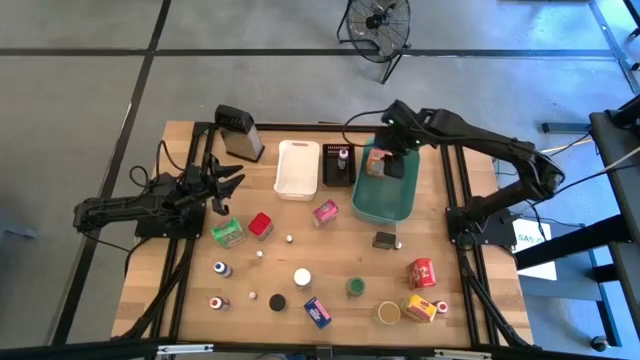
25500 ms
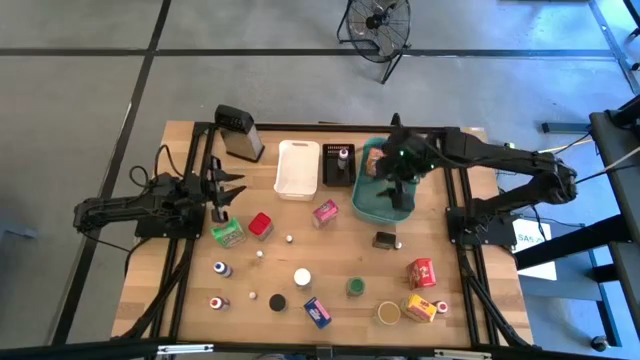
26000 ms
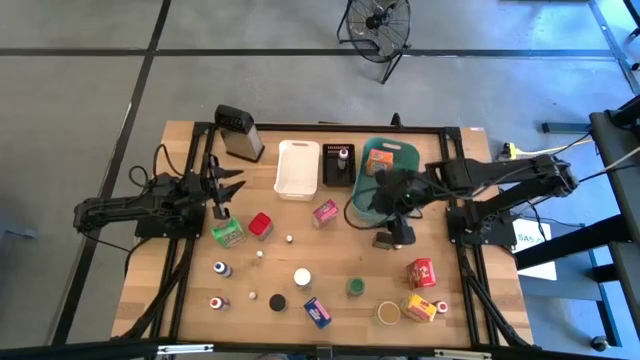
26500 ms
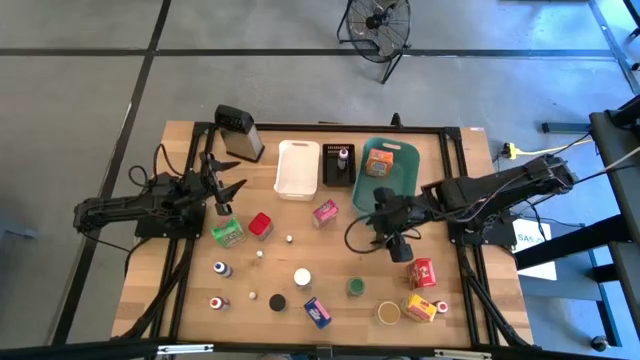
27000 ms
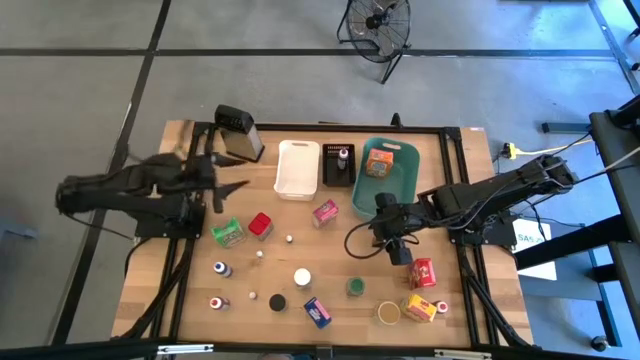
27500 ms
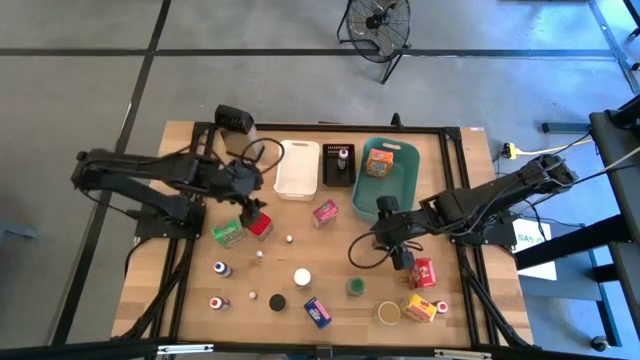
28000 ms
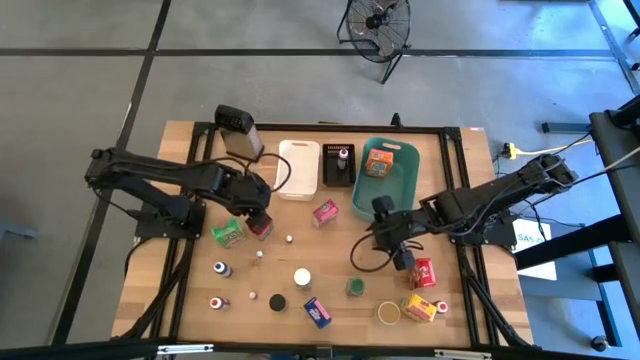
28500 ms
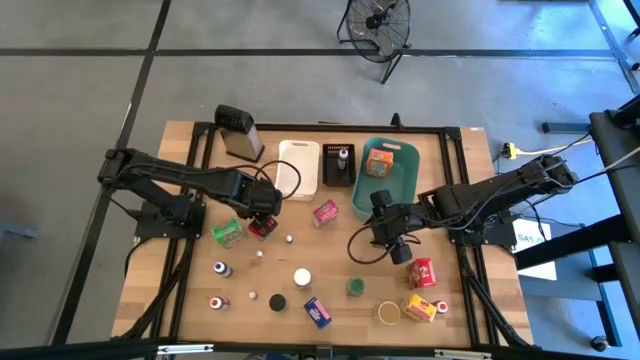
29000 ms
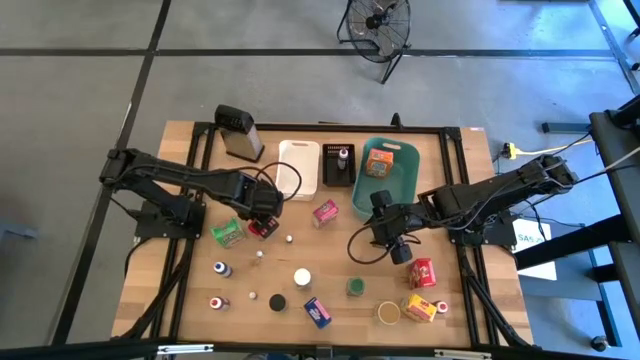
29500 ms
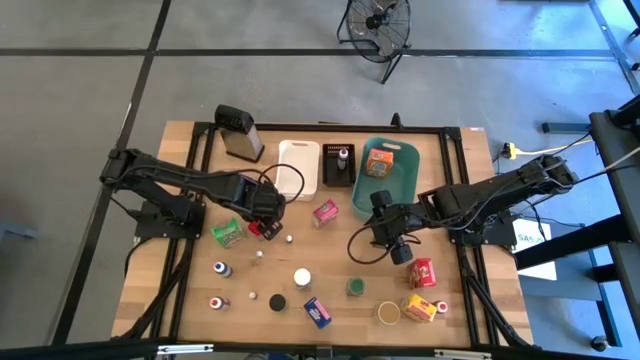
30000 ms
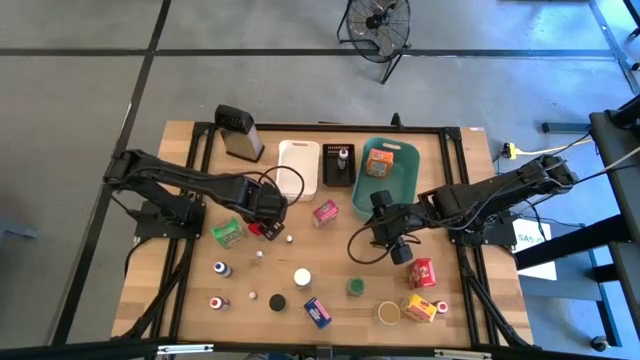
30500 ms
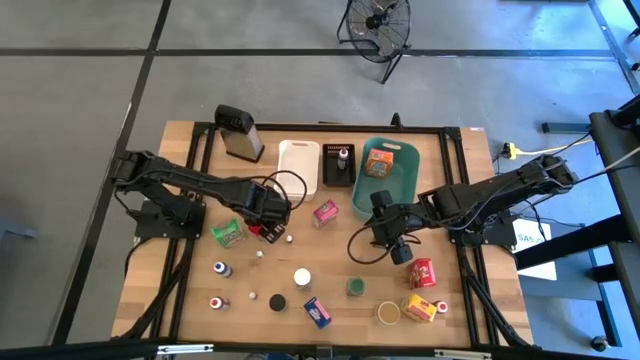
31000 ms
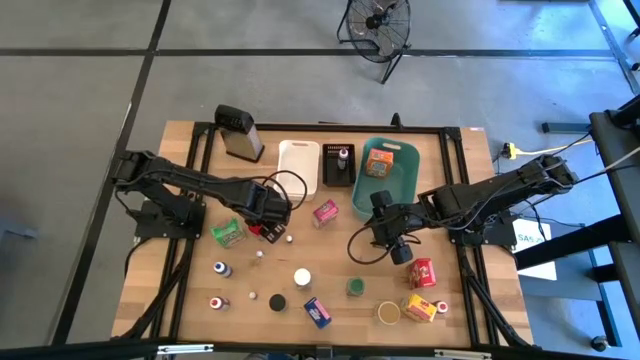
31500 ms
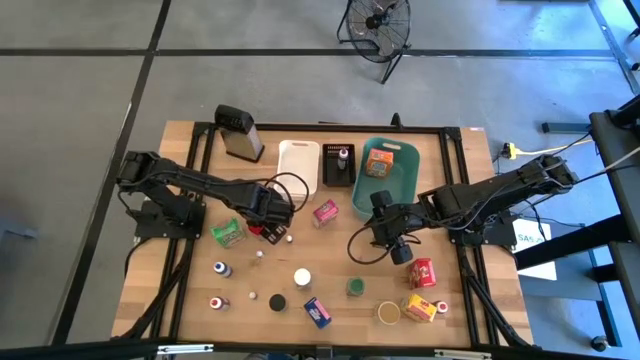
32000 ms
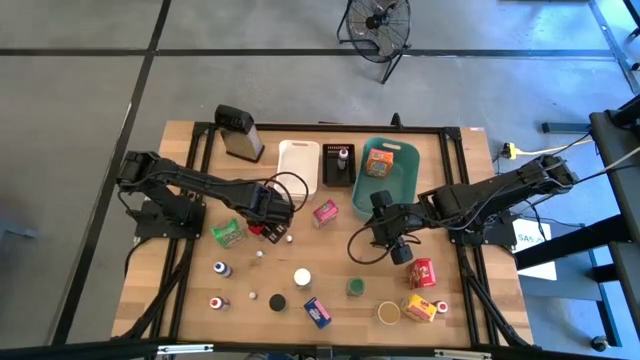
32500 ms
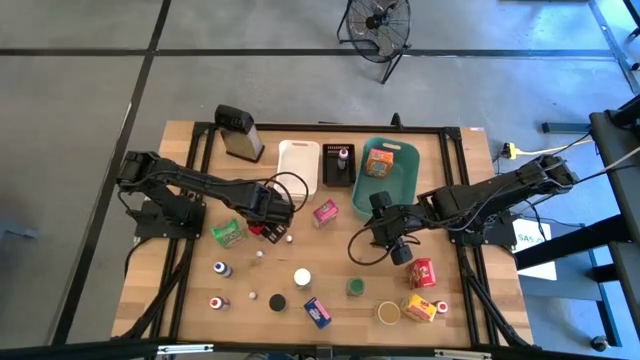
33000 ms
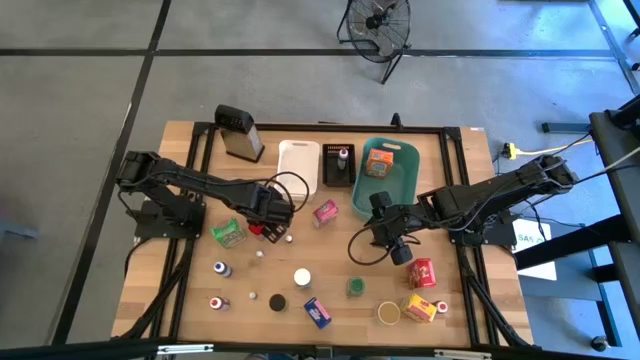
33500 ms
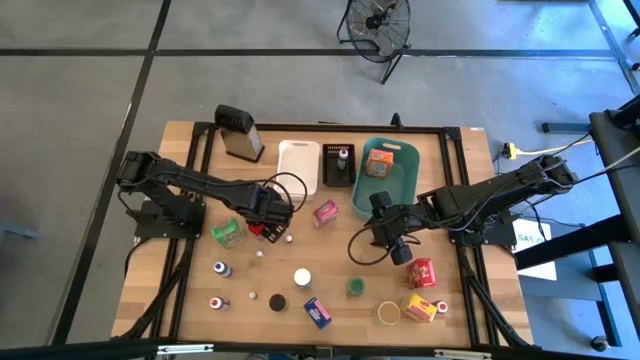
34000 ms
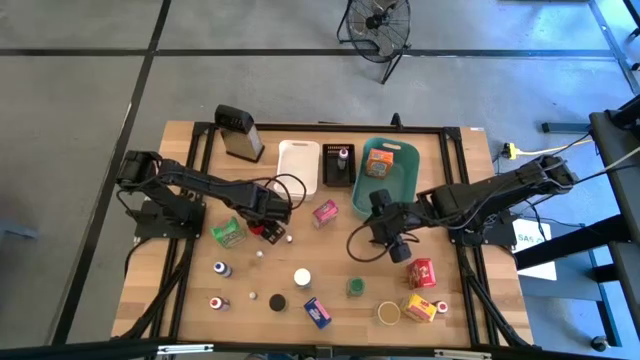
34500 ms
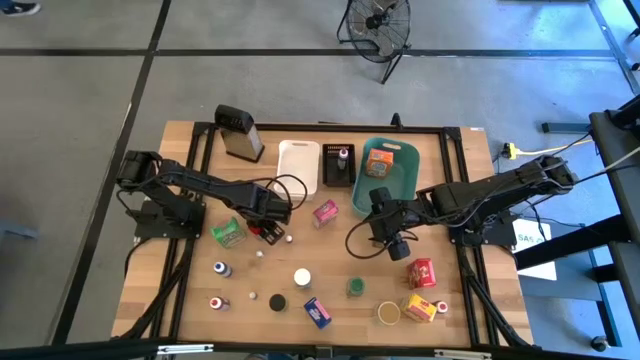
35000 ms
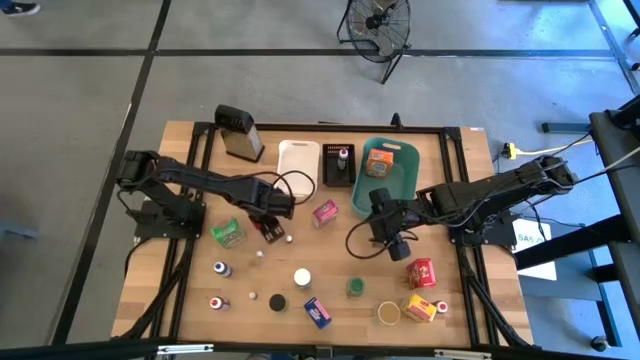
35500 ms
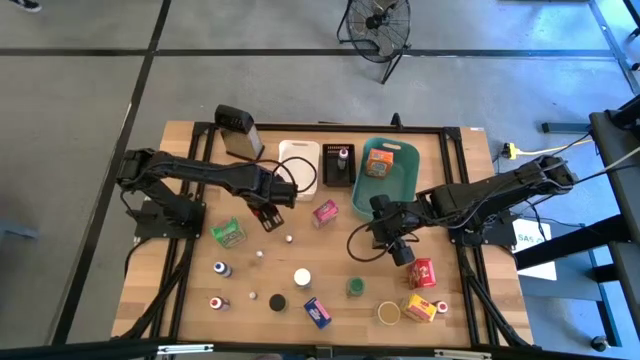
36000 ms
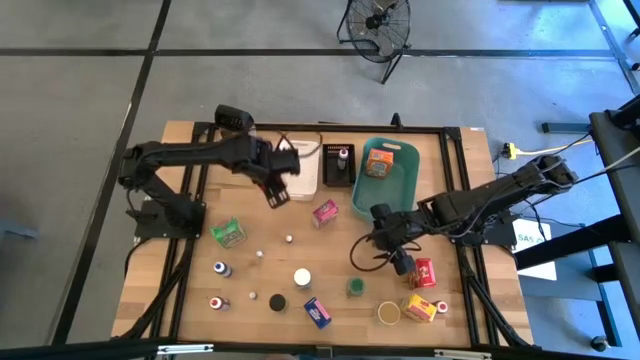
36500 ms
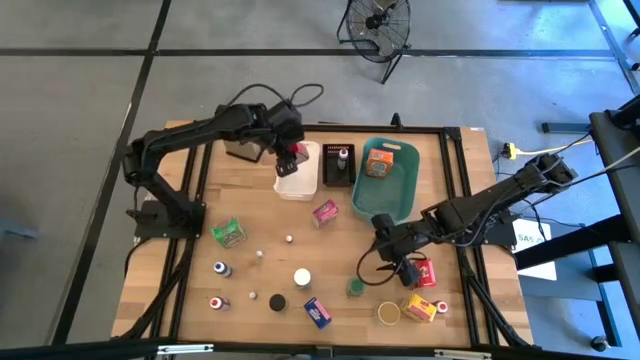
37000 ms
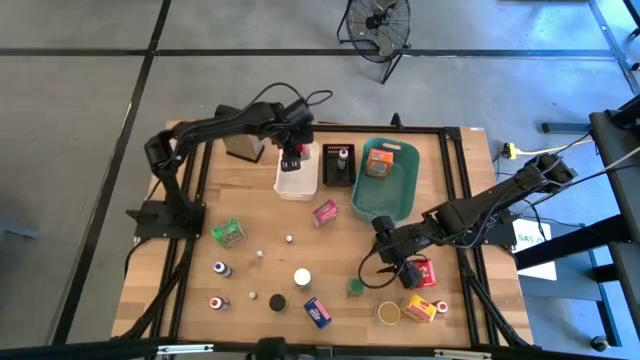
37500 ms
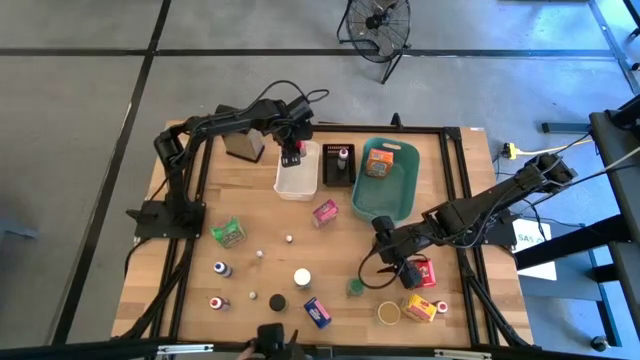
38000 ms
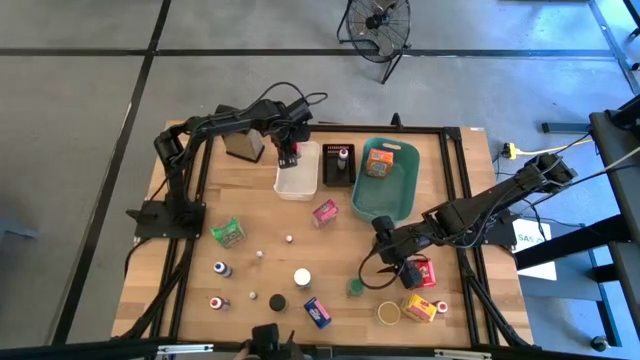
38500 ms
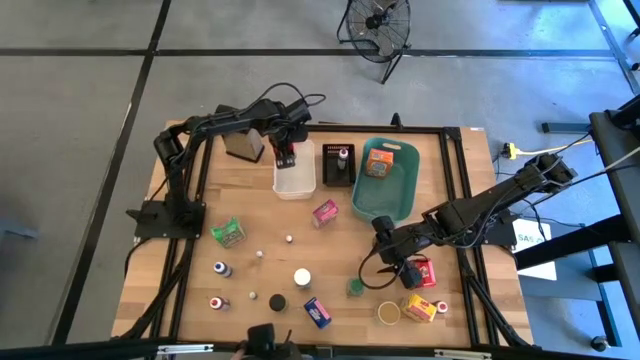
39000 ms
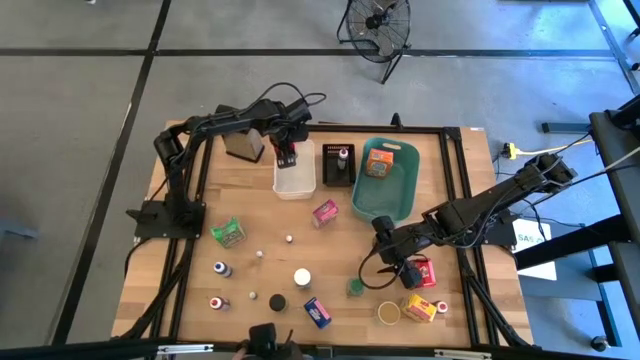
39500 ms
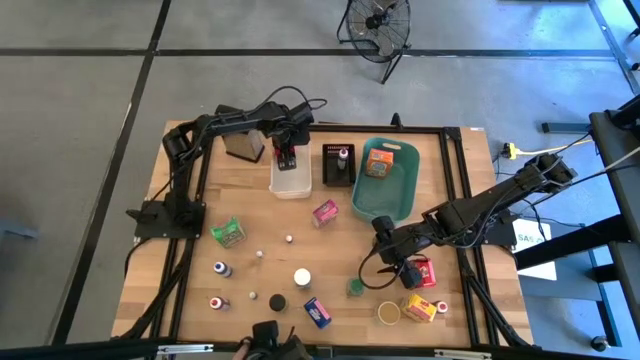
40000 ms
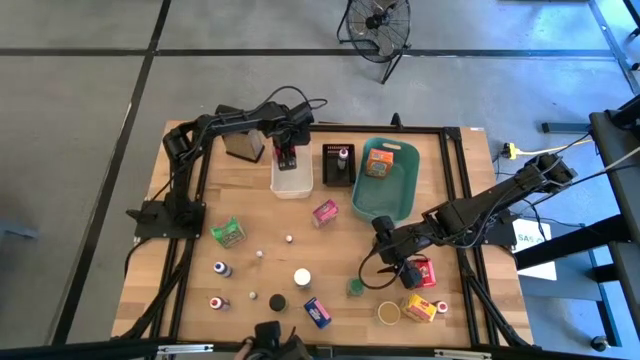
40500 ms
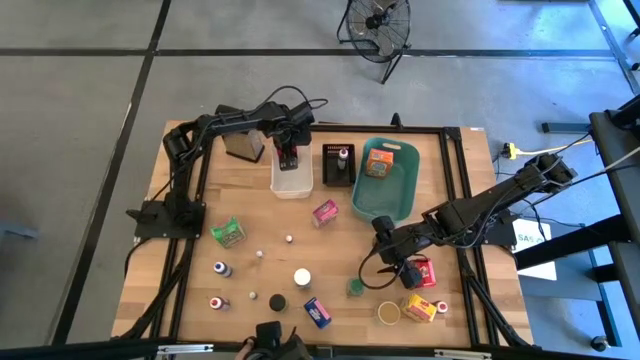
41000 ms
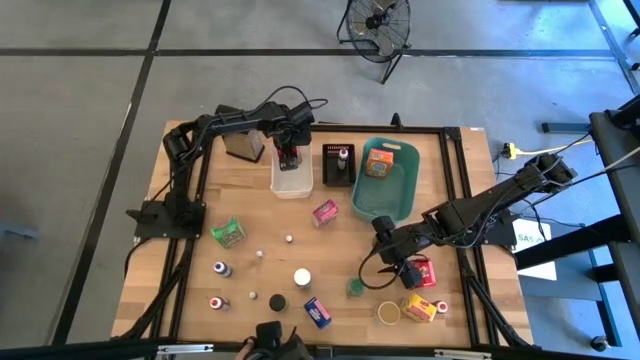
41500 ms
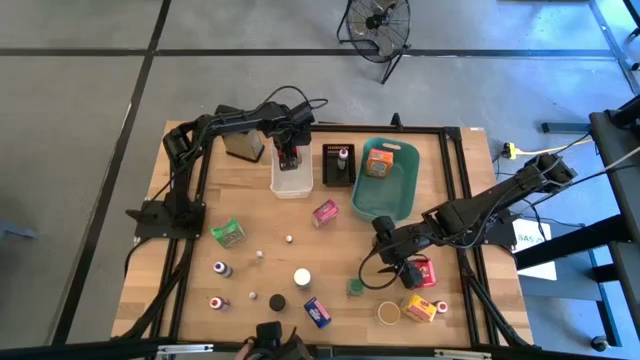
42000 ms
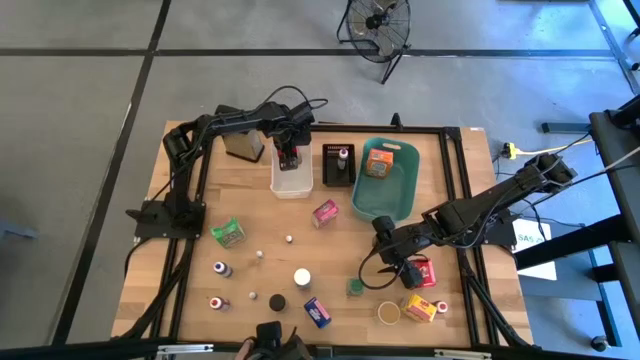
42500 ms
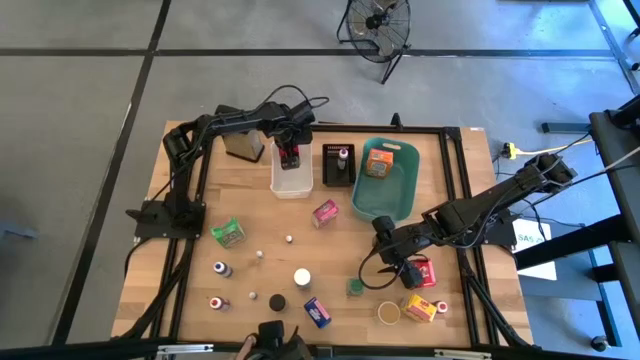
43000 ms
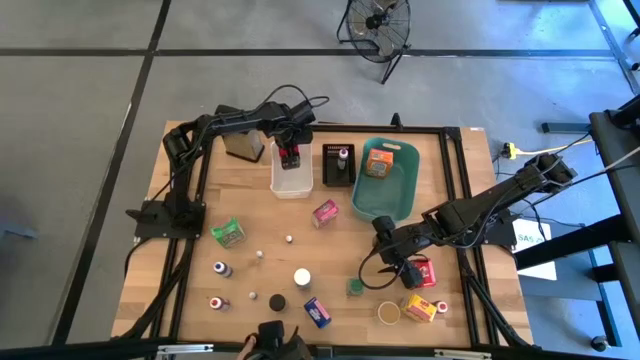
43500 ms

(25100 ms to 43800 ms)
Task: Pick & Place Kitchen Items
Put the red spice can into the white bin

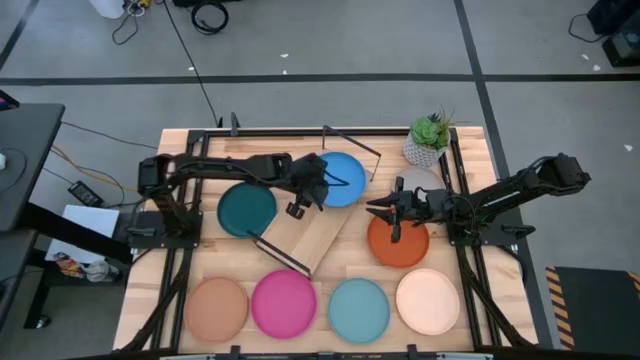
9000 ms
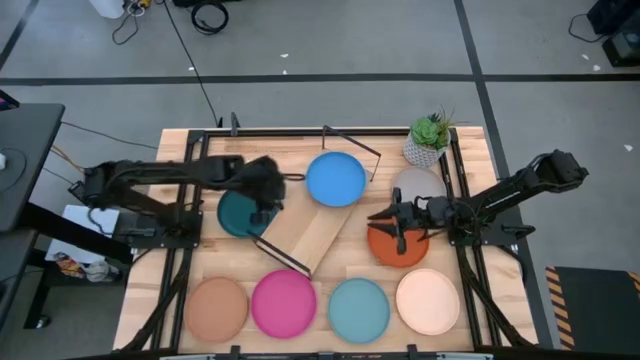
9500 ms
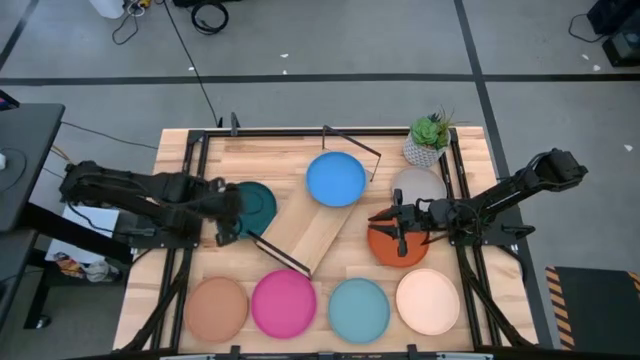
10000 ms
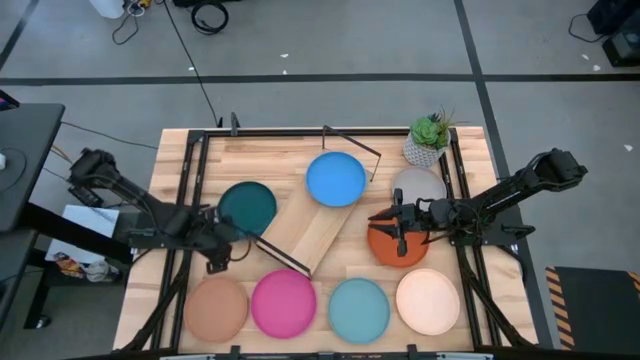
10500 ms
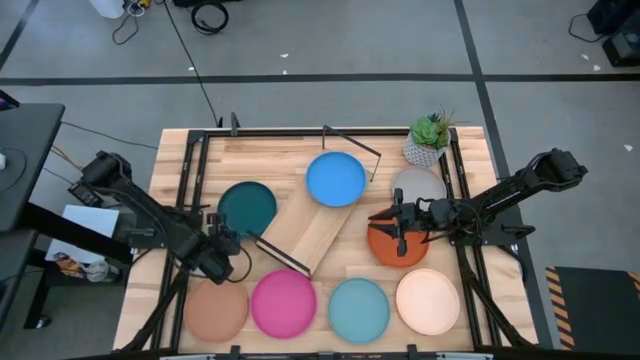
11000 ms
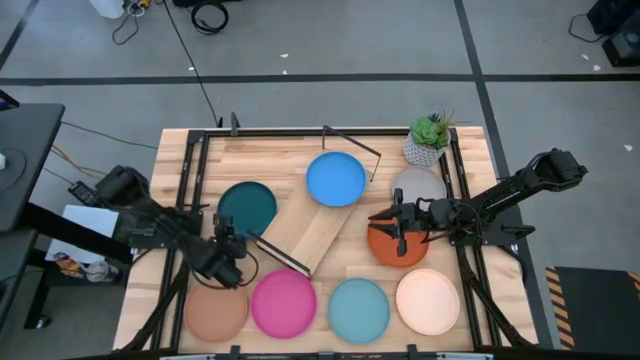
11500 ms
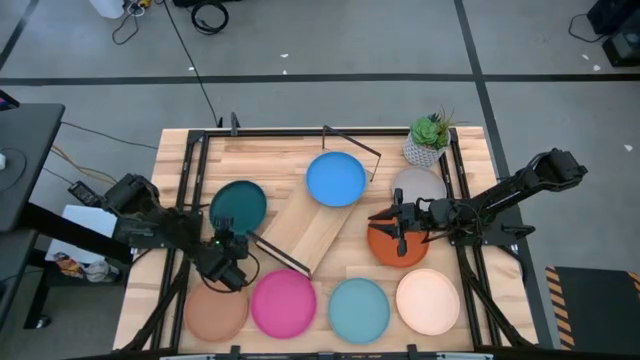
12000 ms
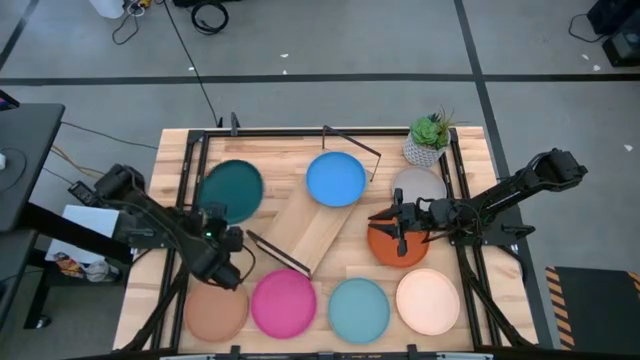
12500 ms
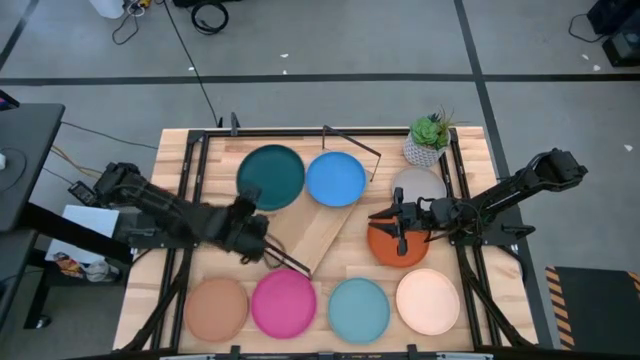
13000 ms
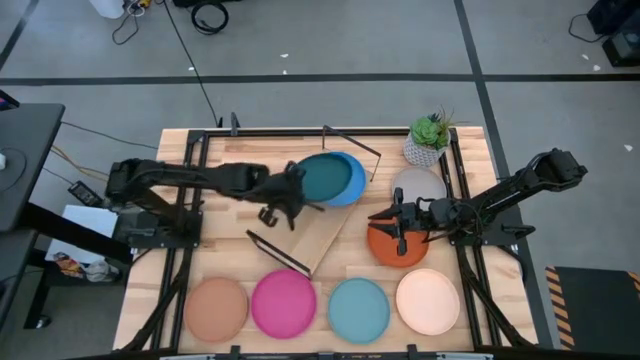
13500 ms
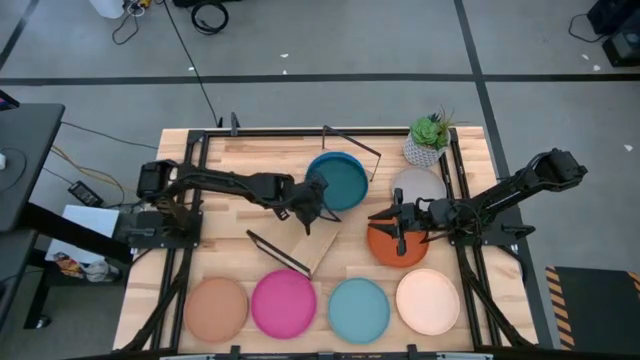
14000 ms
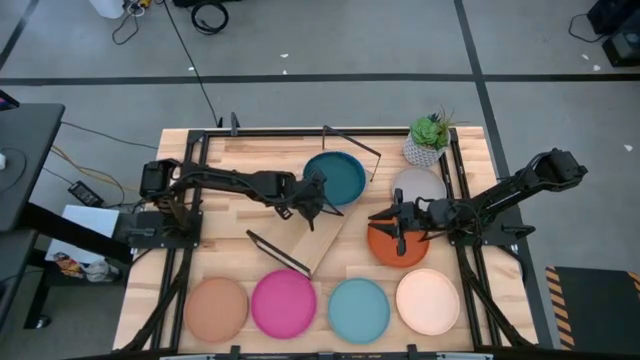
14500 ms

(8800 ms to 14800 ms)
Task: Place and stack plates onto a shelf
Stack the dark green plate on top of the blue plate on the shelf
